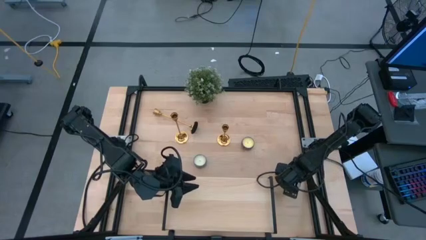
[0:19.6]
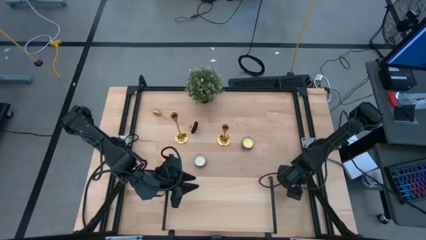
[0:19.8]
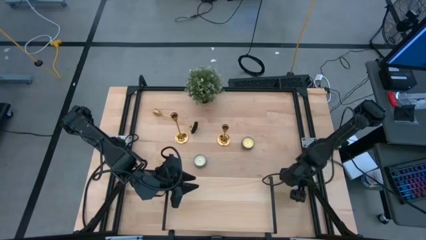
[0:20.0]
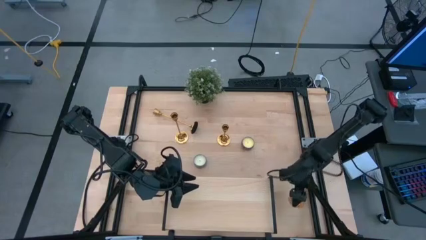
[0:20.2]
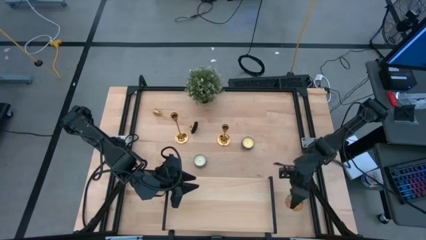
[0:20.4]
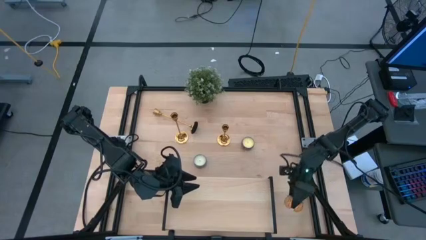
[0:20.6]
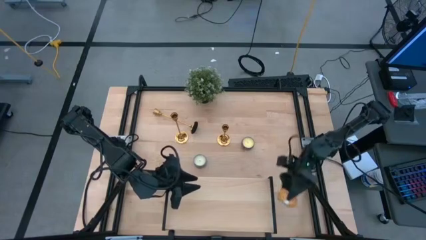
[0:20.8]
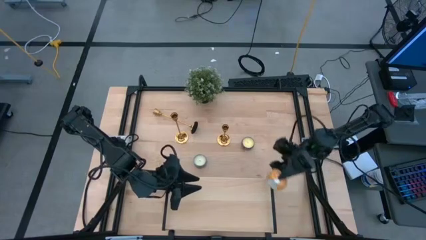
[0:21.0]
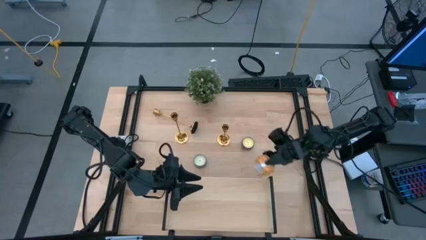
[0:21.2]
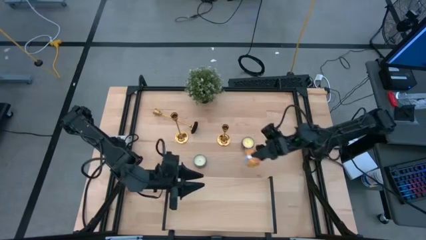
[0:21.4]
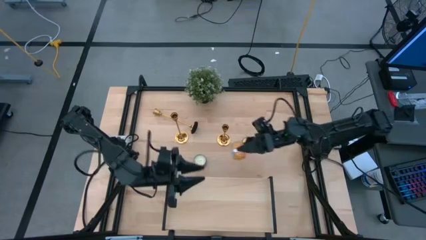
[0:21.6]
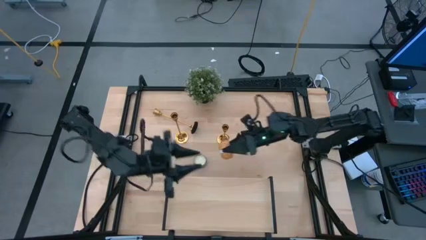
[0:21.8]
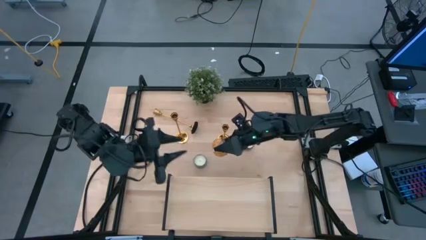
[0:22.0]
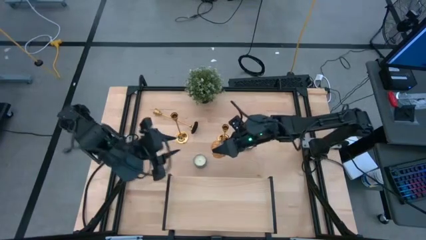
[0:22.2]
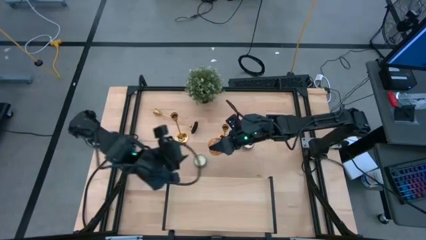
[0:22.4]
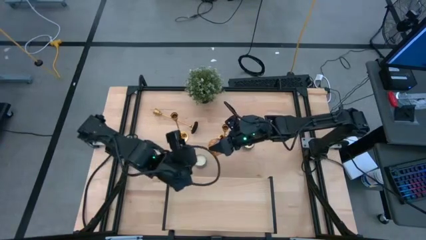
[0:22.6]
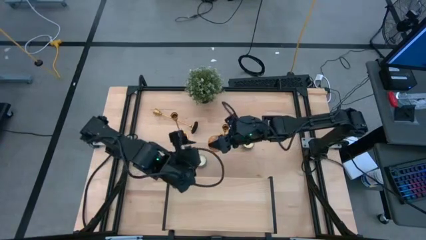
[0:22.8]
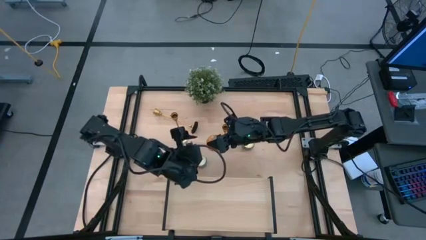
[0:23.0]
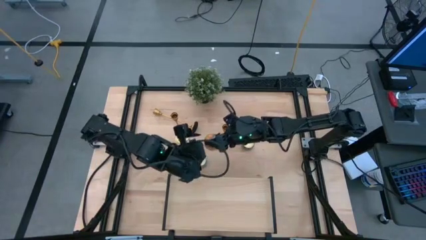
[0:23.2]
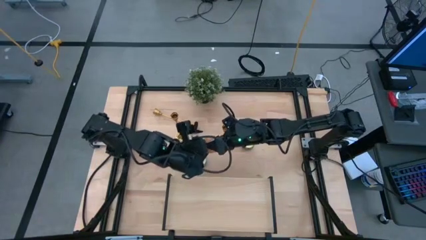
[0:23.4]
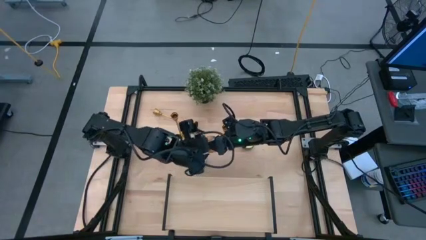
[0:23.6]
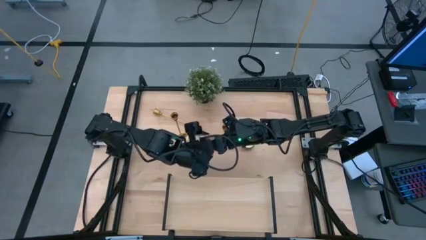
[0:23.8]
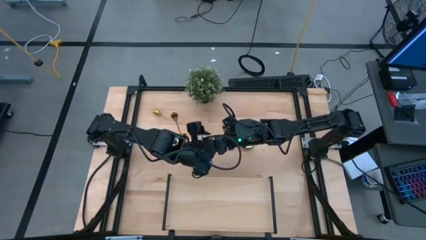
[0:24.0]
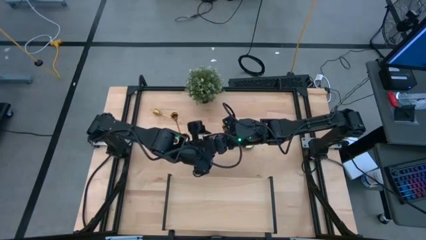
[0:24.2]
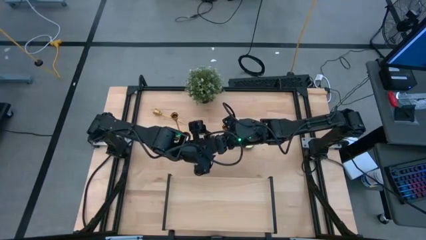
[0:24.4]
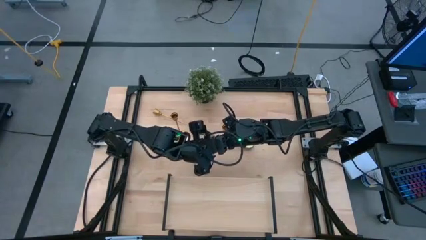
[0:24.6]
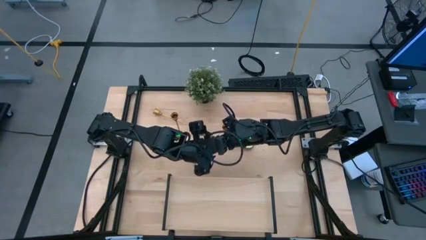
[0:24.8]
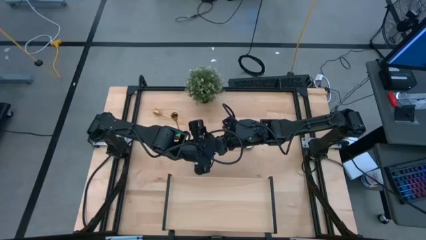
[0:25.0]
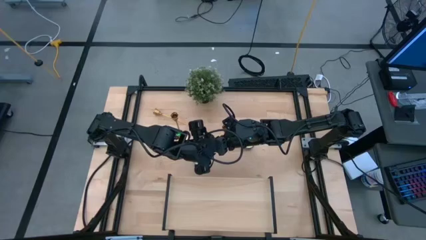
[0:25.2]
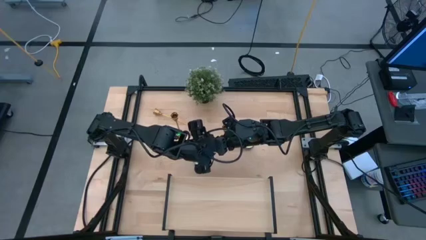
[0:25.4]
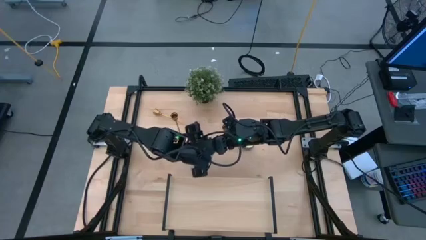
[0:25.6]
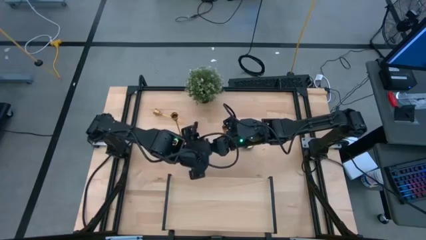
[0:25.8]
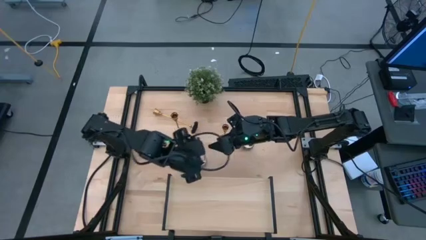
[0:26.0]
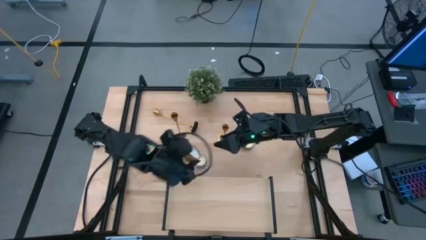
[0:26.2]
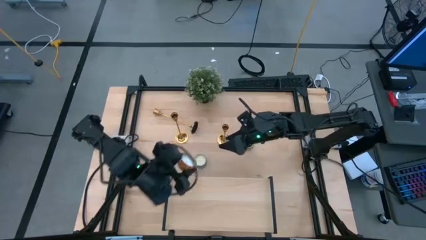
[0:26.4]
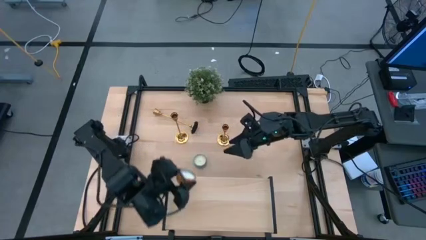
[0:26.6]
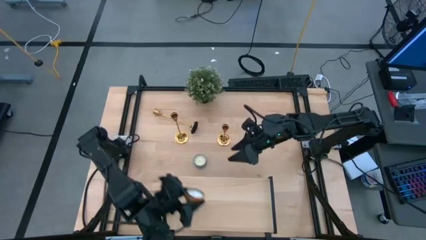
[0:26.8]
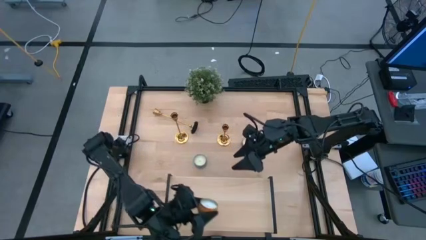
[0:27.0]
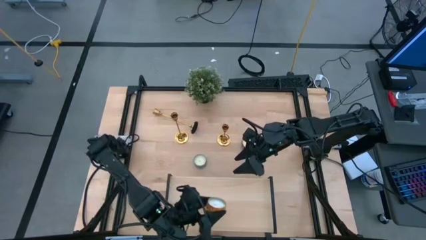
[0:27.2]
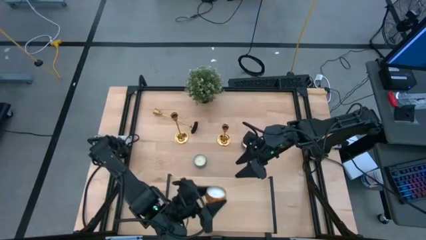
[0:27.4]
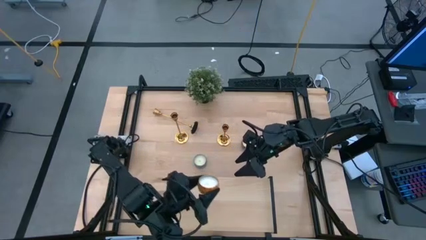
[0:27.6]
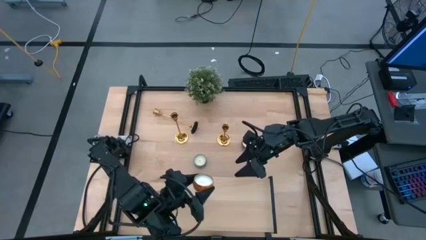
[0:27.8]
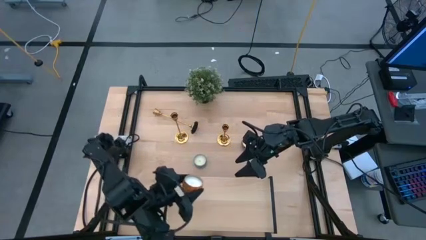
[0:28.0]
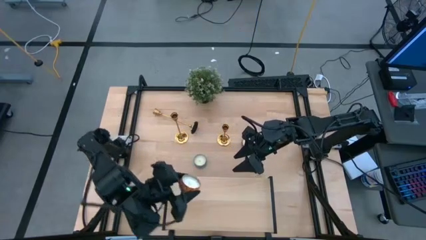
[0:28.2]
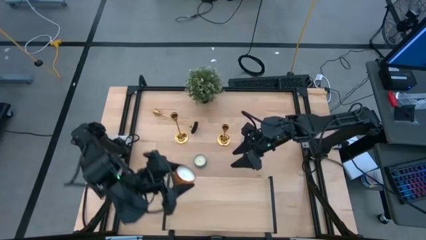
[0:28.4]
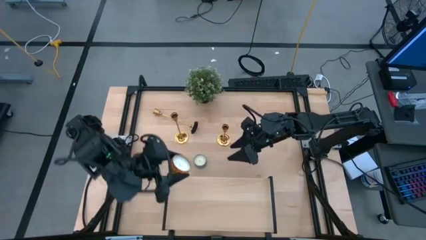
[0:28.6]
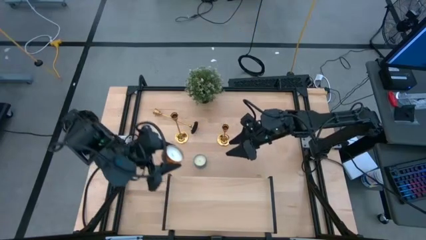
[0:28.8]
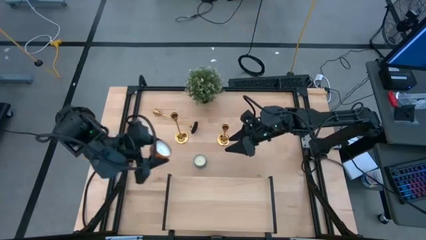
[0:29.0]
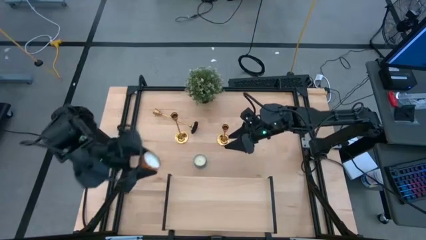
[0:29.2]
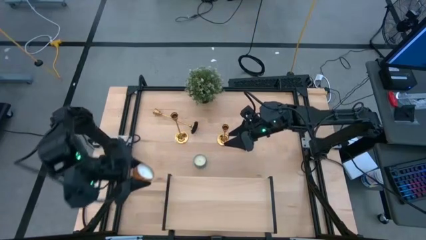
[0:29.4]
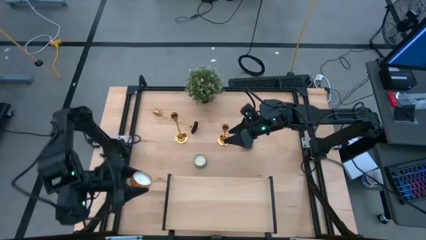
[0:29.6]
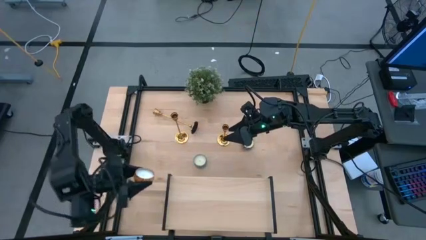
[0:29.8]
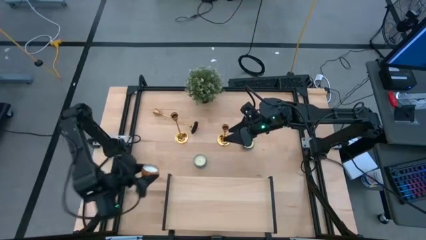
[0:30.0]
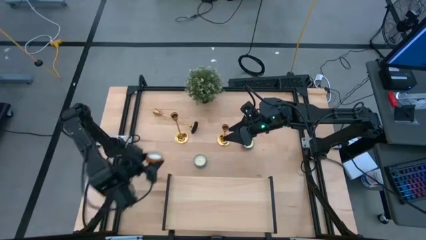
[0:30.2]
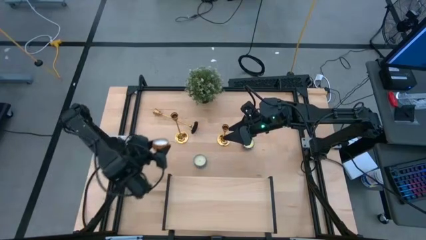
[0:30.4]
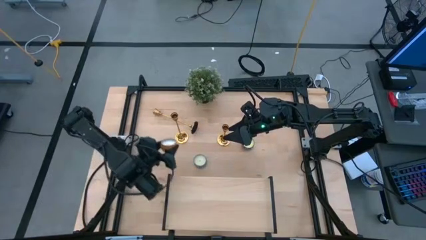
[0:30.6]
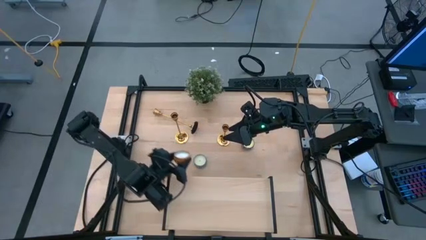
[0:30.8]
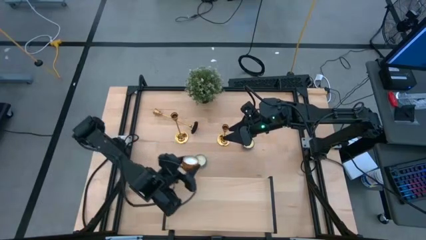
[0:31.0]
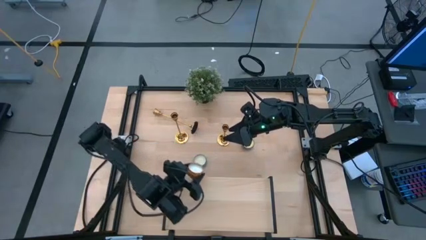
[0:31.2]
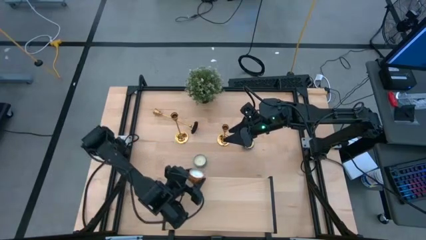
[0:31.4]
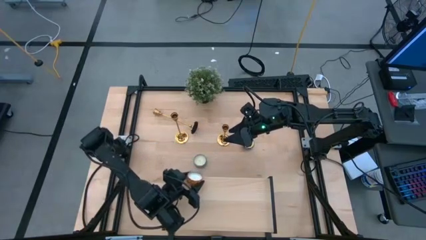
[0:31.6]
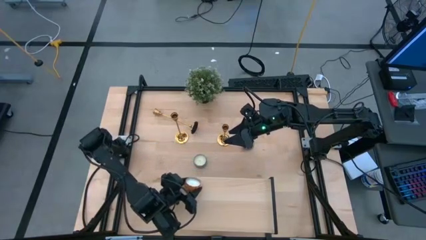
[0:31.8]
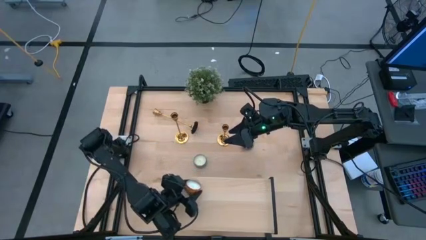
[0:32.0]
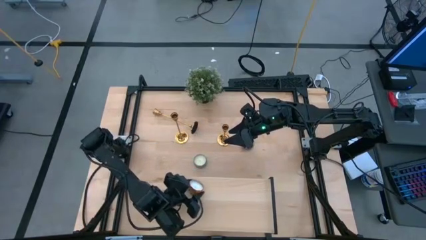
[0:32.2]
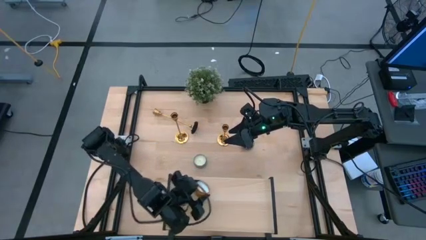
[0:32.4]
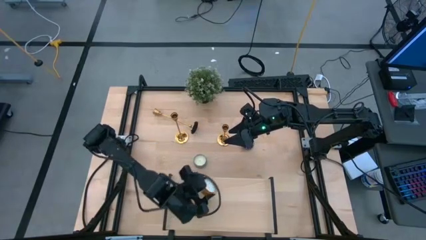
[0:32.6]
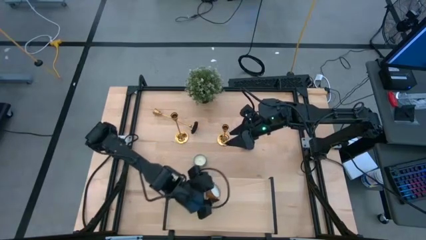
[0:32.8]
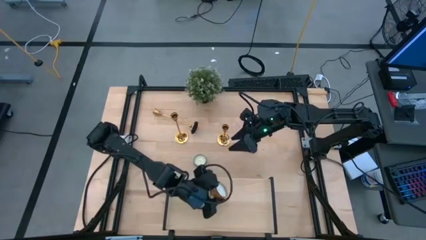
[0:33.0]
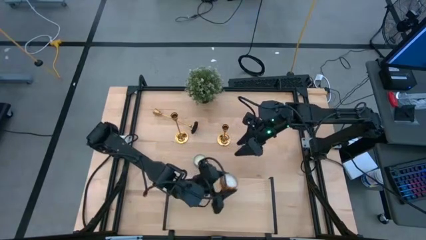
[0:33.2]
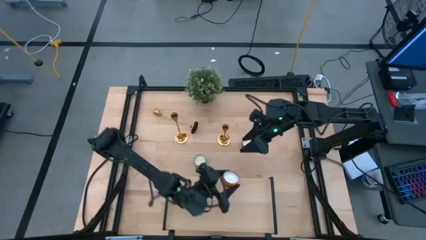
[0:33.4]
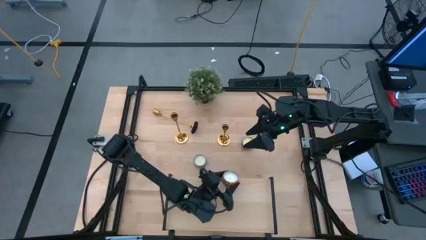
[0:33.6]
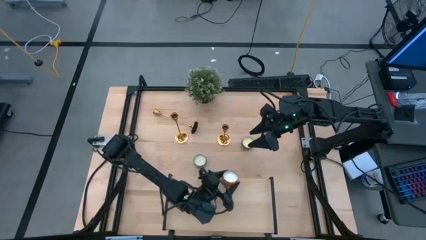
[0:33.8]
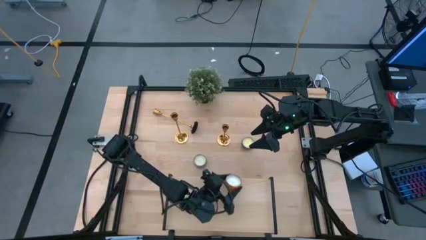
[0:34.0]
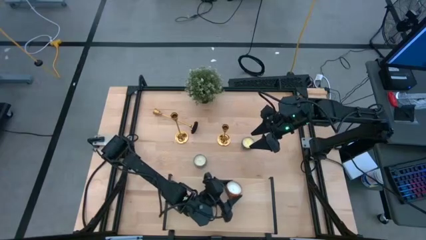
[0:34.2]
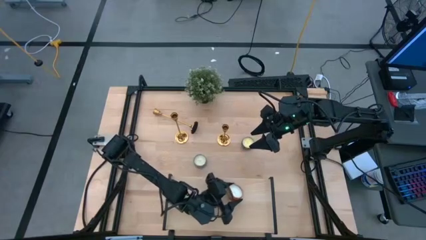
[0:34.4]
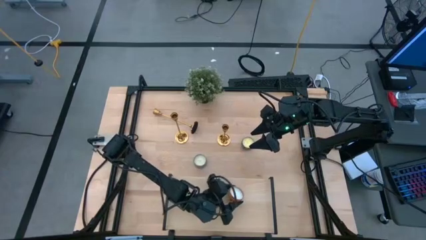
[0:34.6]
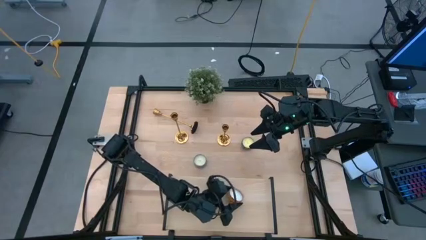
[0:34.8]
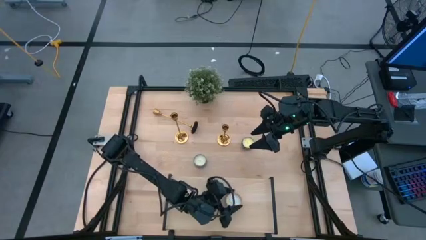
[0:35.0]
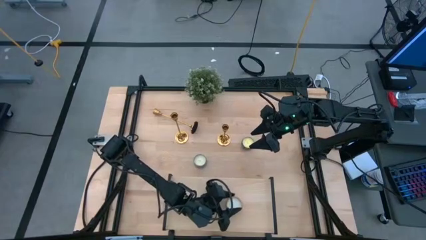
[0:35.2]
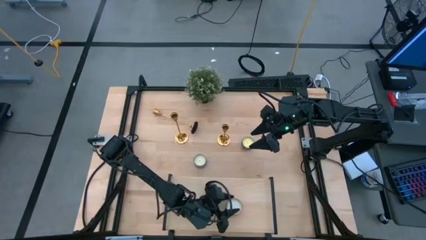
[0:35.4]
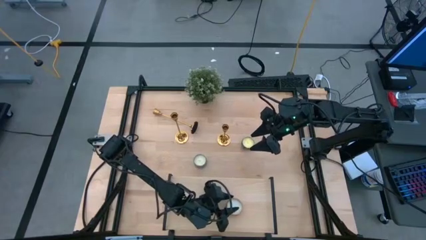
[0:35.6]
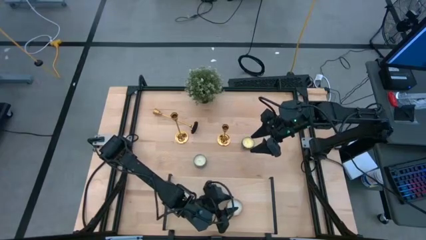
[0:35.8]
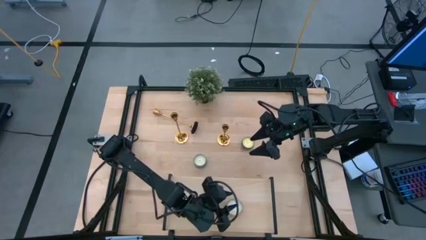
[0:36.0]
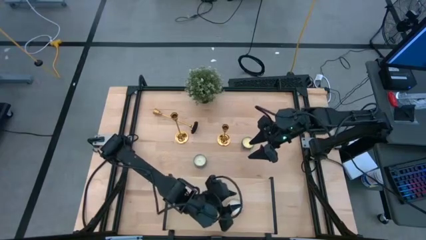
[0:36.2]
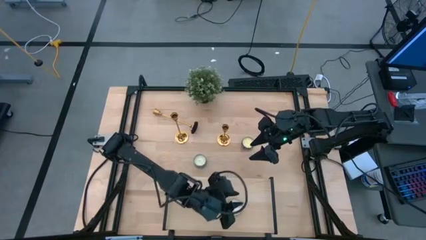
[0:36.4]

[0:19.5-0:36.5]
Task: Pick & Place candle stick holders
Put the yellow scented candle on the shelf
